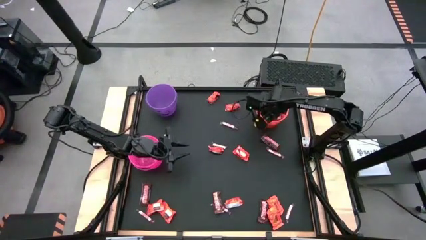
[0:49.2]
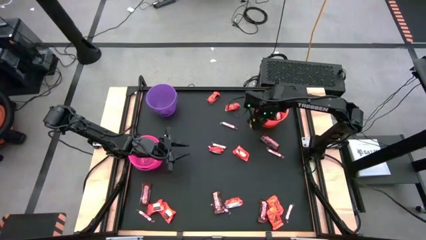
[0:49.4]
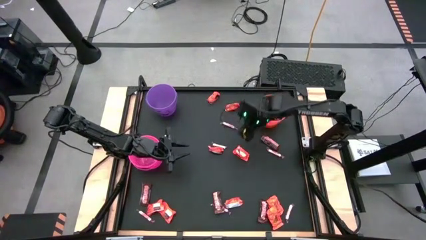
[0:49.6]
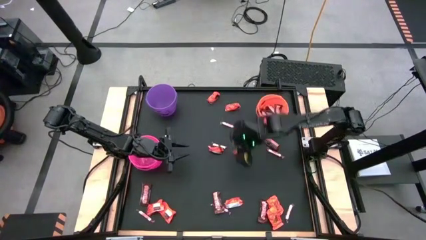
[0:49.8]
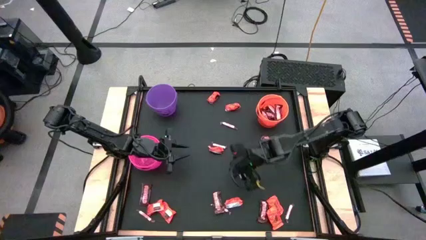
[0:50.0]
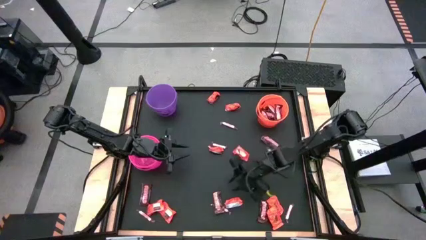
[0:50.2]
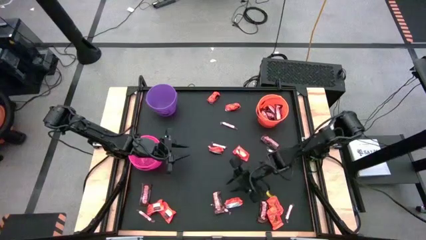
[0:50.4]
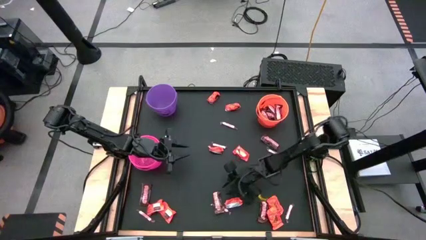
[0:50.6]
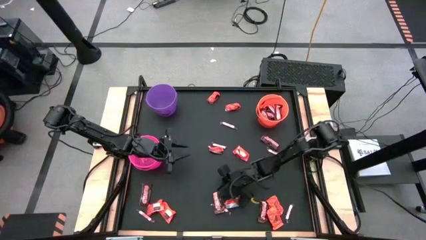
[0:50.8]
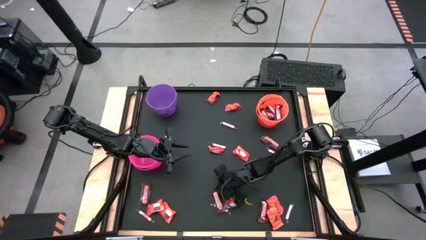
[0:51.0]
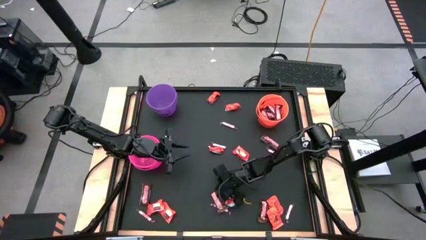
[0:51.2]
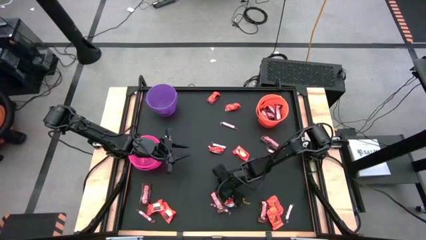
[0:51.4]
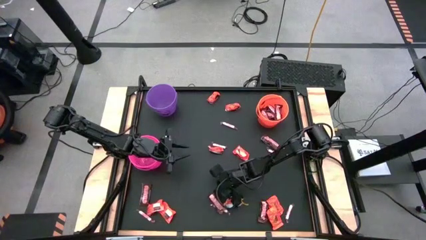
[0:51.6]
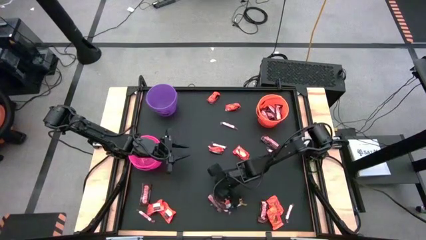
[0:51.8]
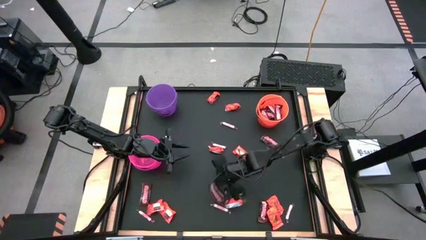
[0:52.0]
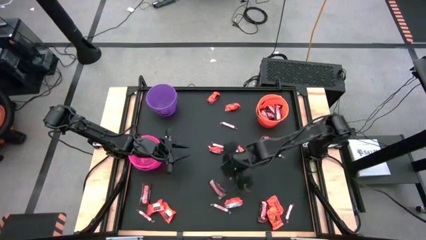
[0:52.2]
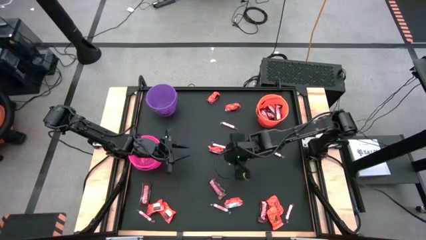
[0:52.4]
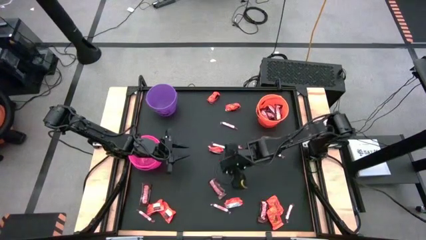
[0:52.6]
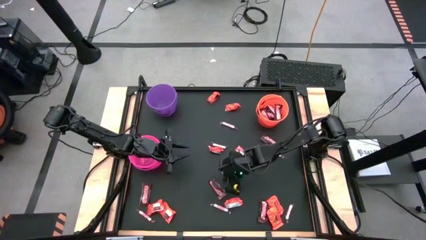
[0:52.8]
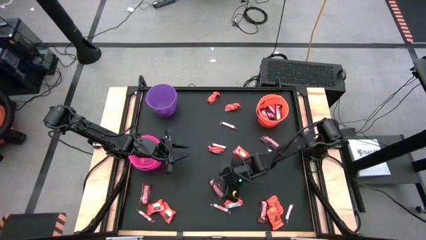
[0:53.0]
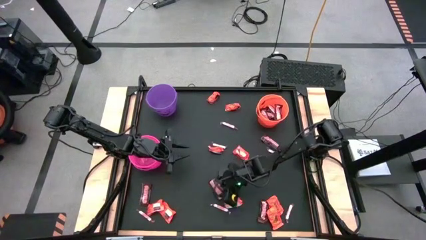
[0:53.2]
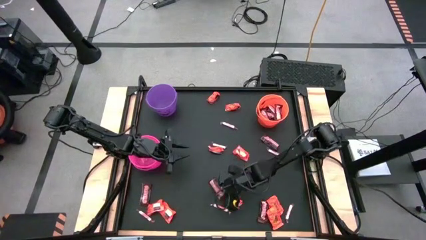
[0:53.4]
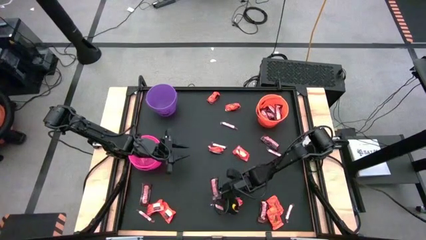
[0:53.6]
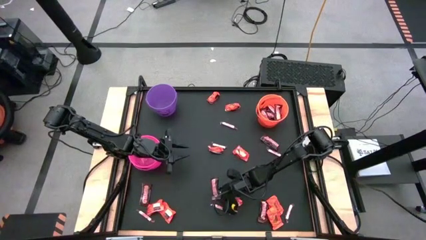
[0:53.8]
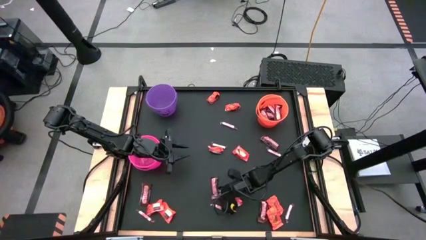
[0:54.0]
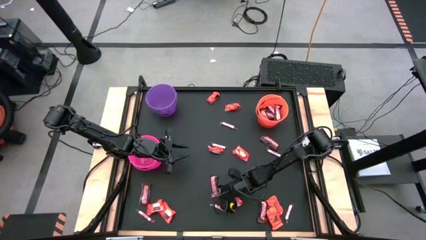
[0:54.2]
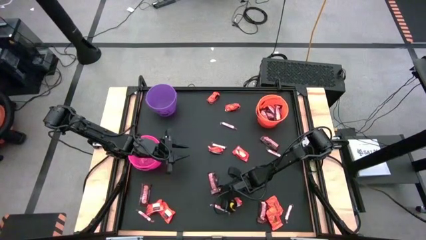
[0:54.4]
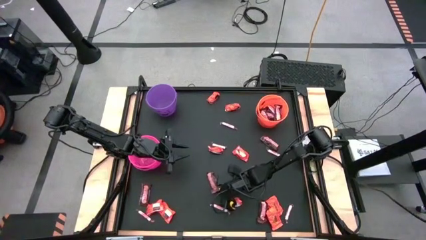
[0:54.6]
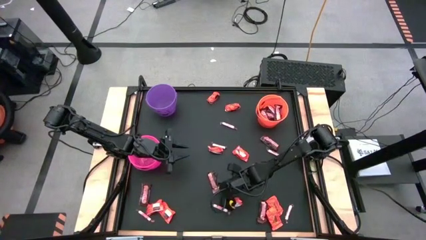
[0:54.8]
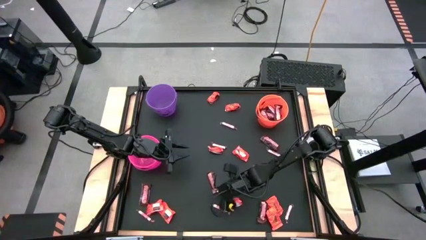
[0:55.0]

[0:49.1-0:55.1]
Task: Sort candy by brand, put in halloween buckets
Put the brown candy into the orange bucket

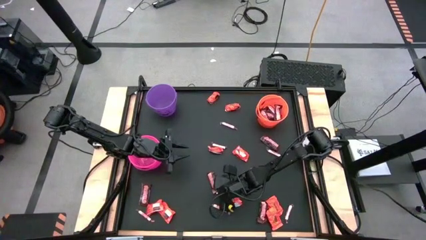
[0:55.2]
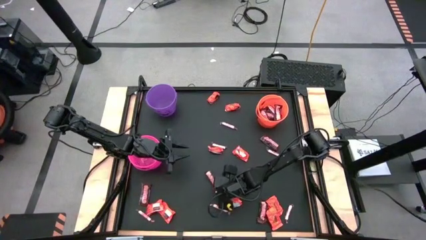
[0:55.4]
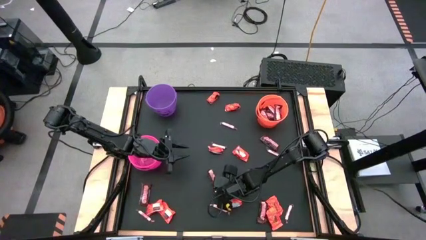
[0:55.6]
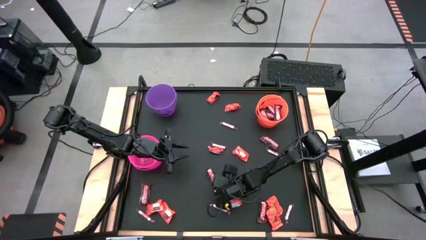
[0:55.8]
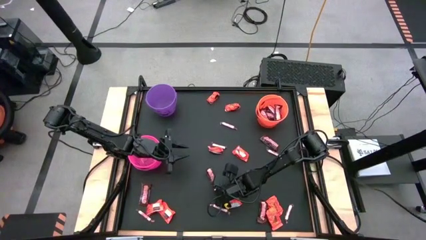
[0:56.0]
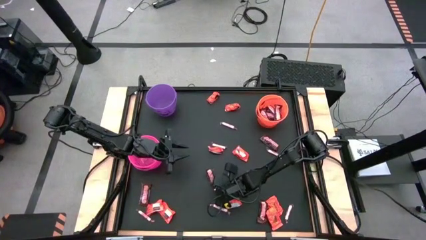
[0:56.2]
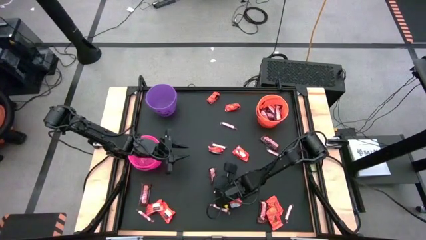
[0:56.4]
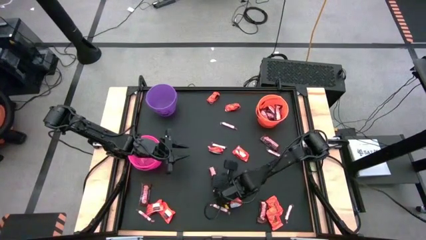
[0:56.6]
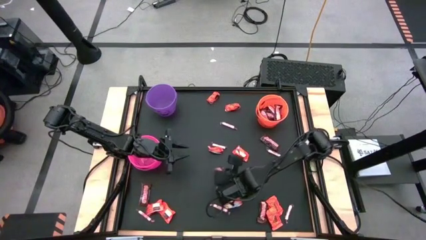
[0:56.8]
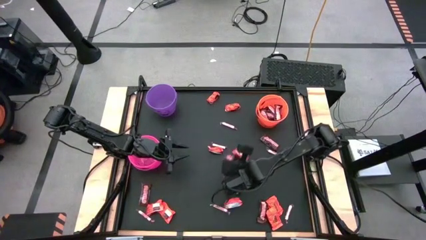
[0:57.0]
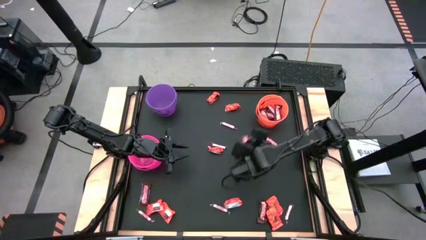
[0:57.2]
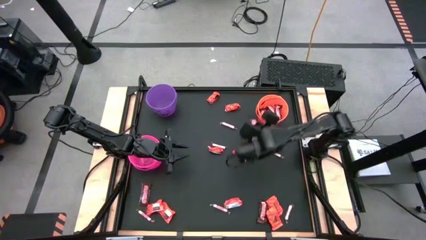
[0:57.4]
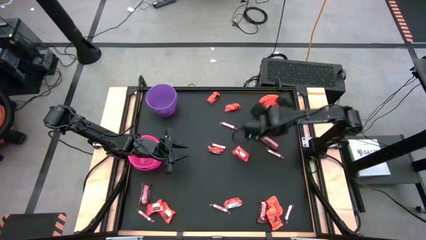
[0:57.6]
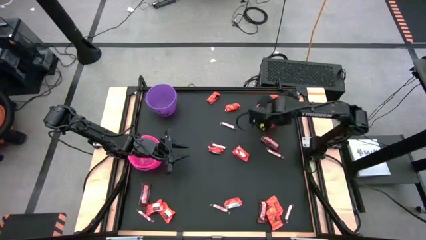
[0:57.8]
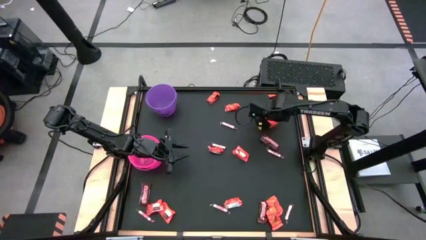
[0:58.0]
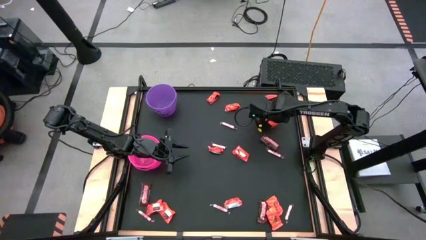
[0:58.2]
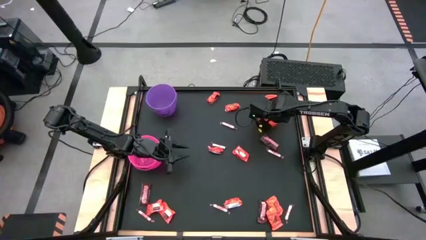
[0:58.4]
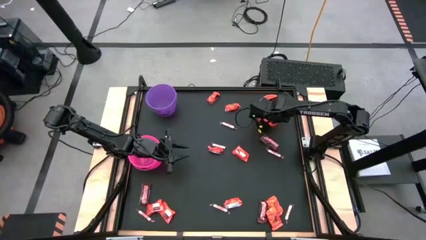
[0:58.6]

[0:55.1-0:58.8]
Put the brown candy into the orange bucket

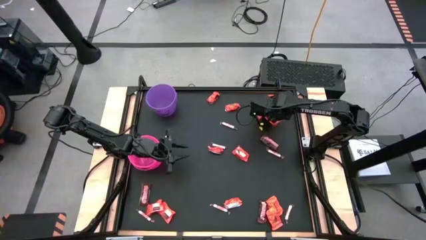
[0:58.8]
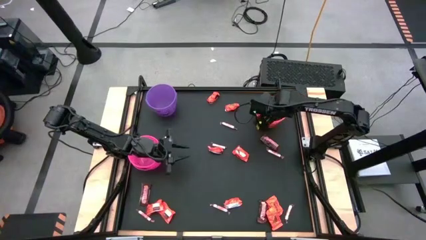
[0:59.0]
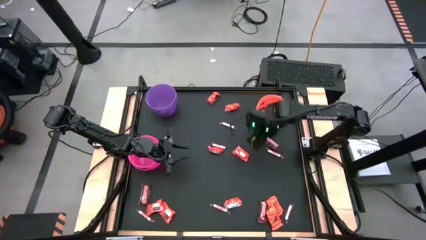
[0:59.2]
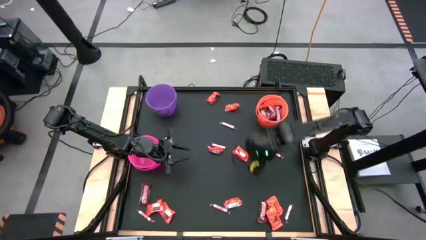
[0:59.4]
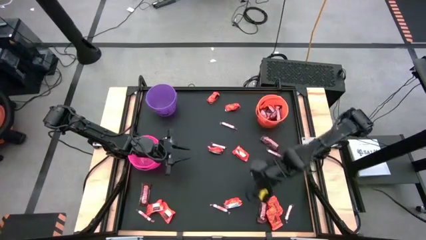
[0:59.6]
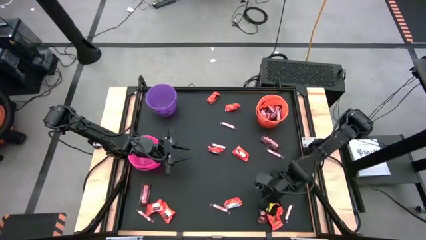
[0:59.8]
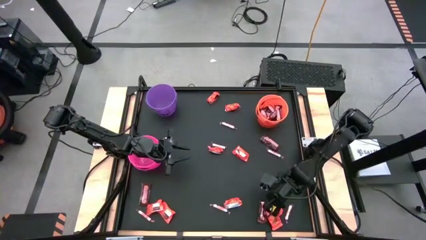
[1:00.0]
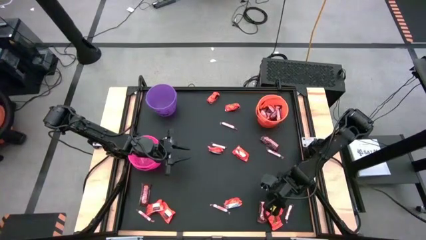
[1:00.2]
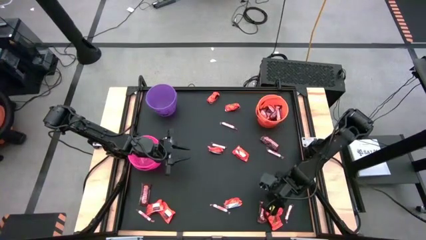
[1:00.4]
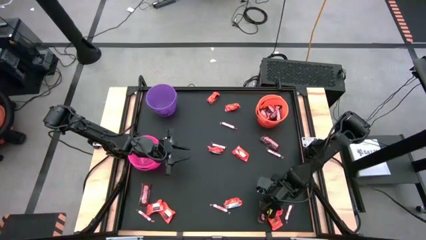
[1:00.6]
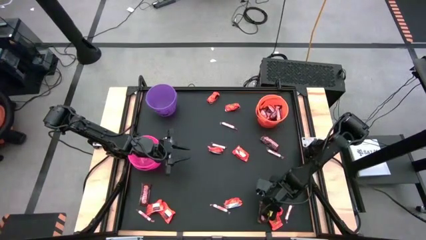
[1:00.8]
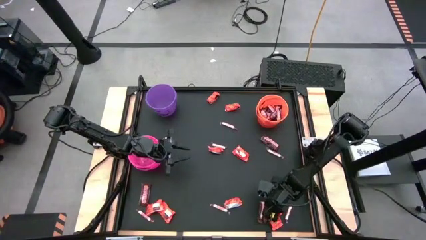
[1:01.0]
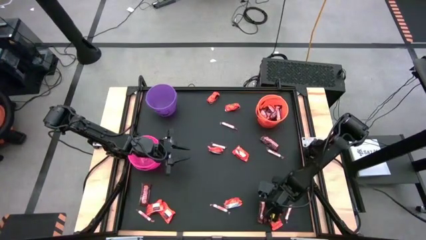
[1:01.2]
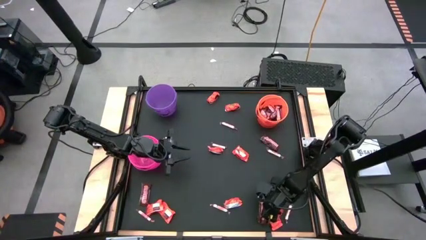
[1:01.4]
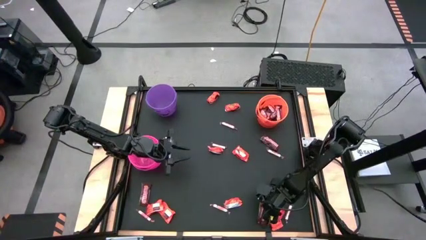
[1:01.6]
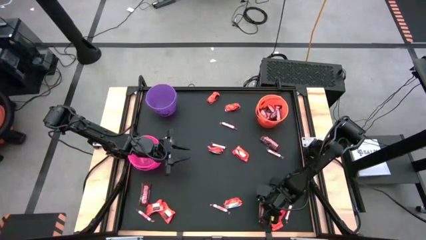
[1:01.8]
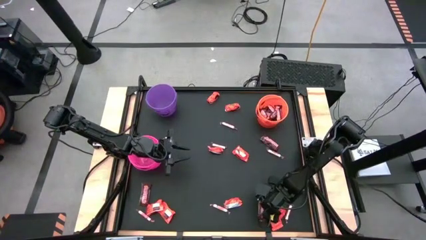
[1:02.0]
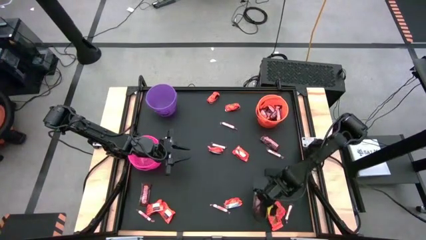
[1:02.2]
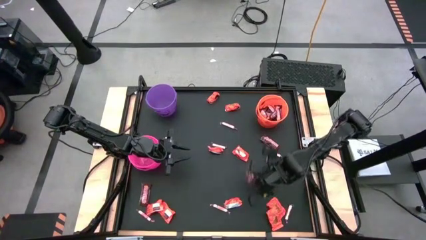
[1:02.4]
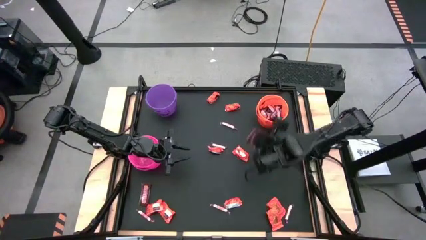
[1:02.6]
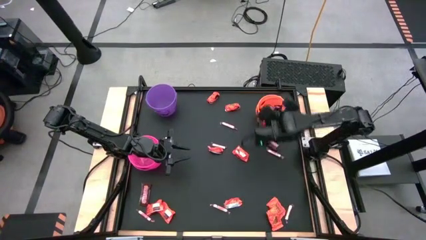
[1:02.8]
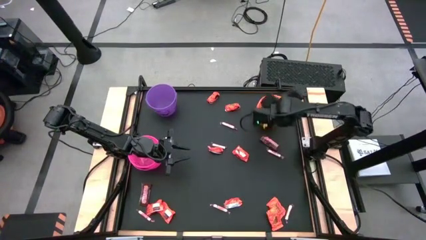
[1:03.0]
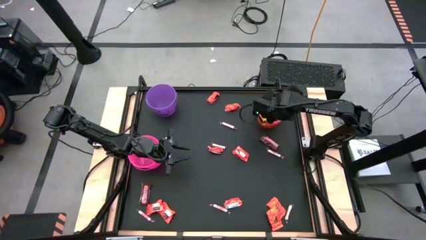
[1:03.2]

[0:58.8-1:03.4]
Put the brown candy into the orange bucket

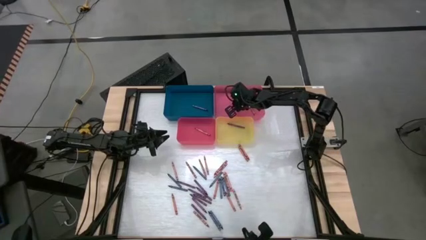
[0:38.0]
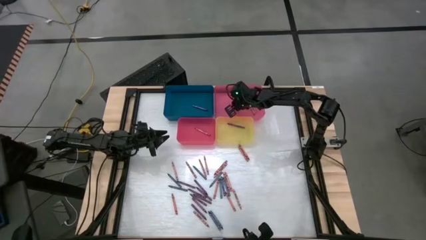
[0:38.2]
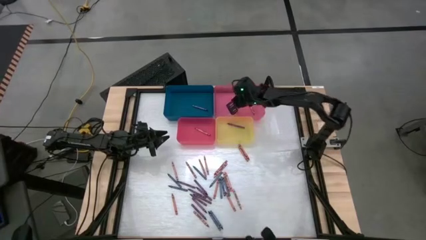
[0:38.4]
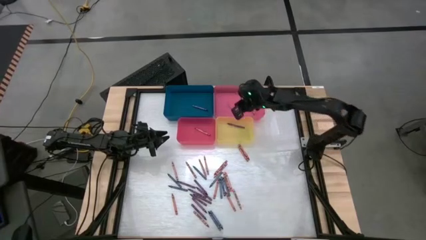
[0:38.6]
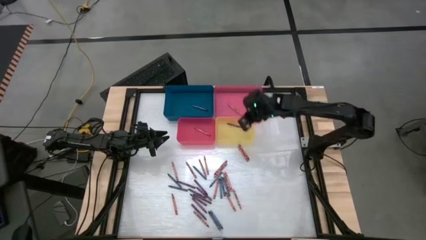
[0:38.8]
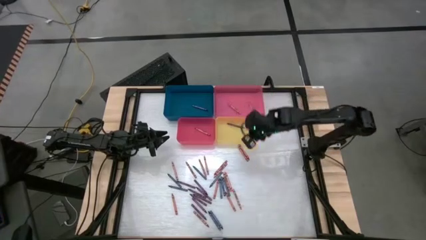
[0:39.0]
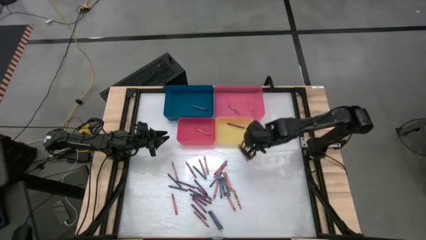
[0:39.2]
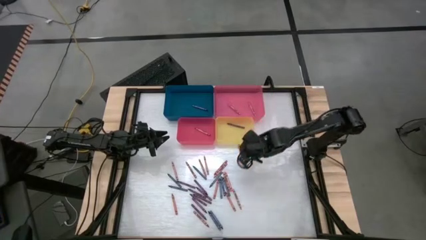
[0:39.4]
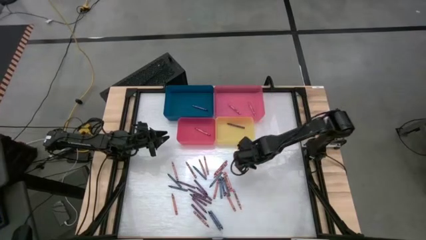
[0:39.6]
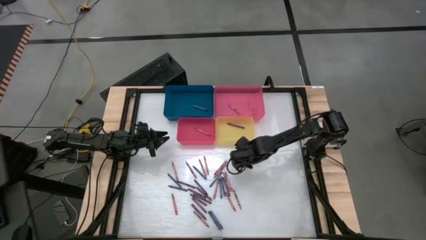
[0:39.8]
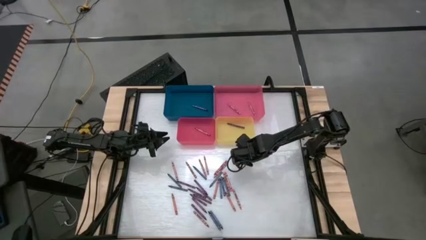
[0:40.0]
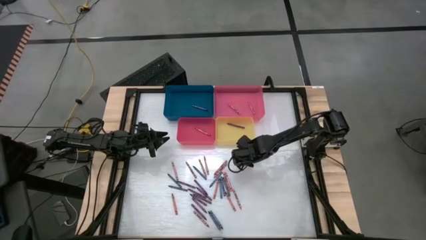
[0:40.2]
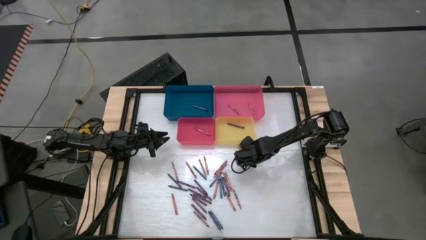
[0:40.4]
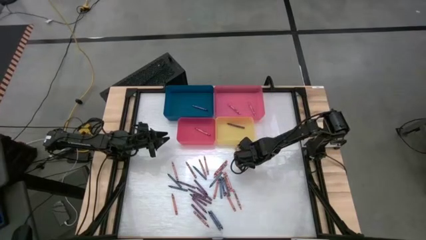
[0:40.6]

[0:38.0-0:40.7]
Task: Sort crayons
Put the red crayon into the red bin
